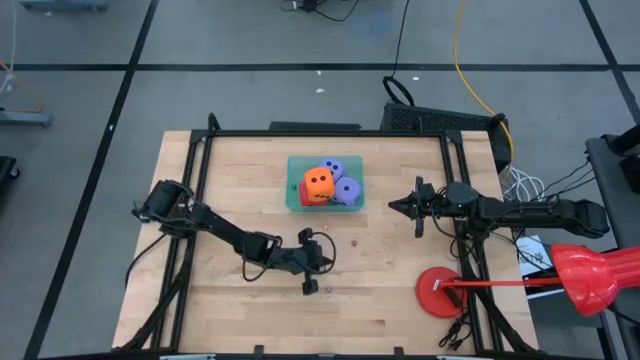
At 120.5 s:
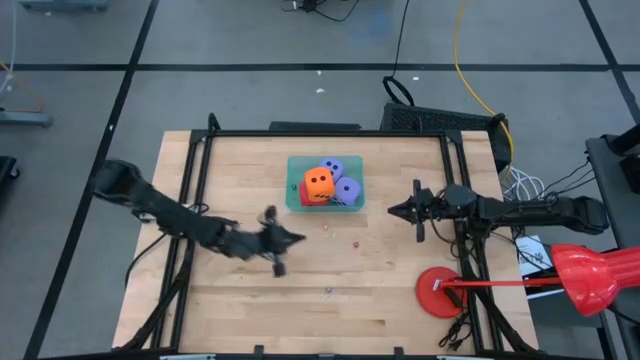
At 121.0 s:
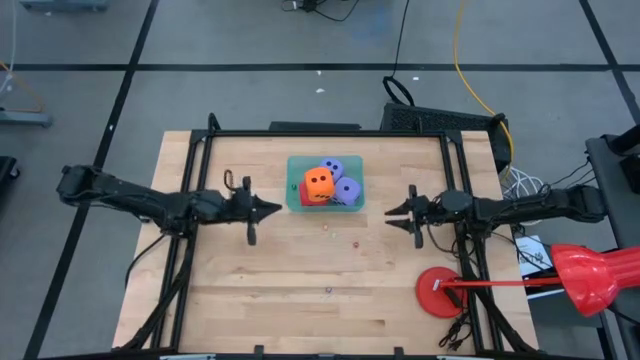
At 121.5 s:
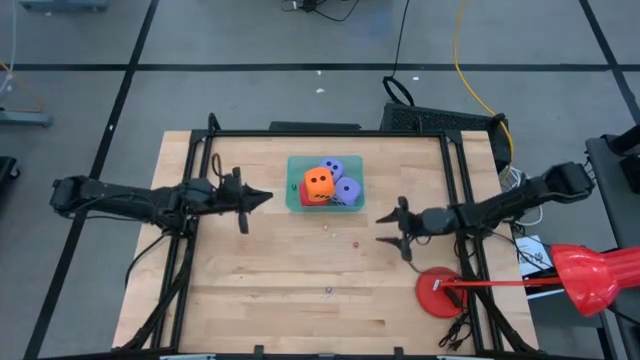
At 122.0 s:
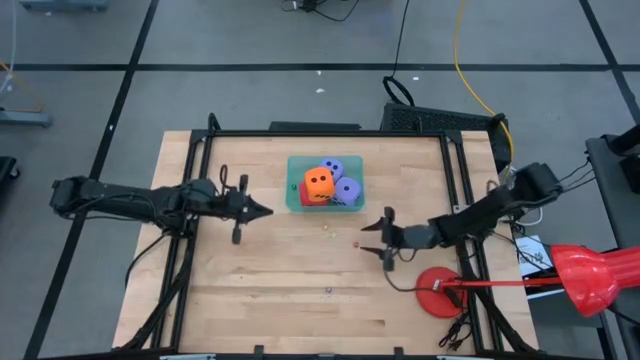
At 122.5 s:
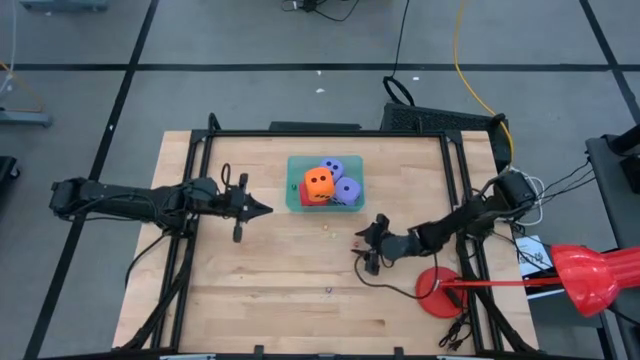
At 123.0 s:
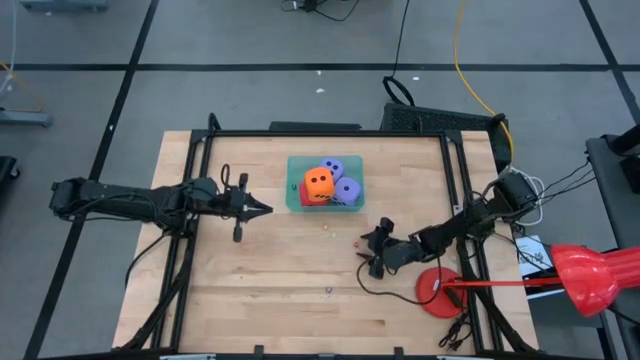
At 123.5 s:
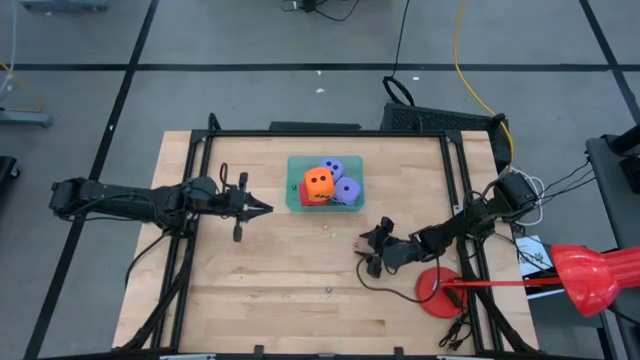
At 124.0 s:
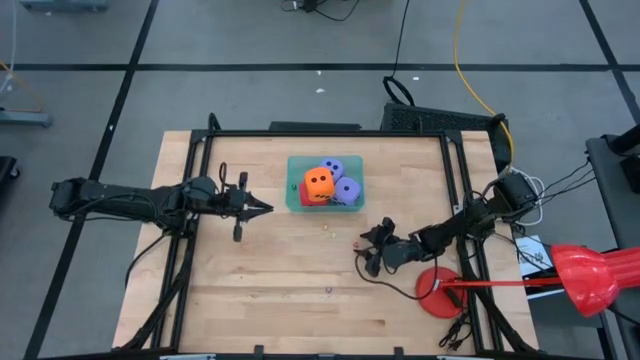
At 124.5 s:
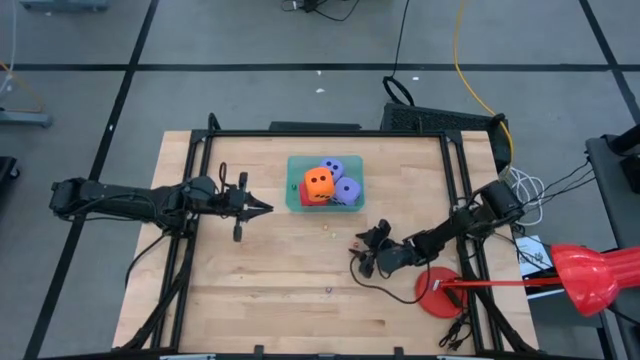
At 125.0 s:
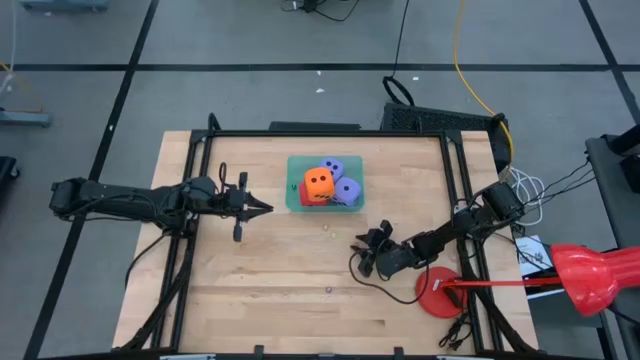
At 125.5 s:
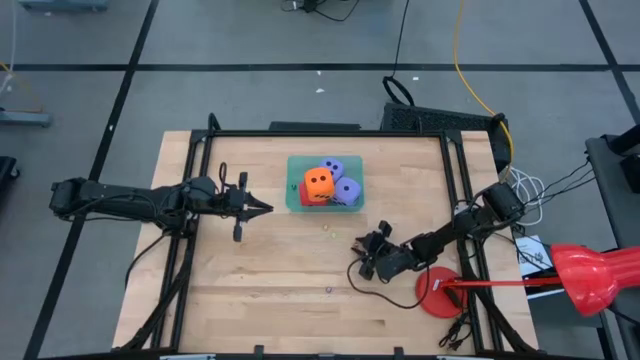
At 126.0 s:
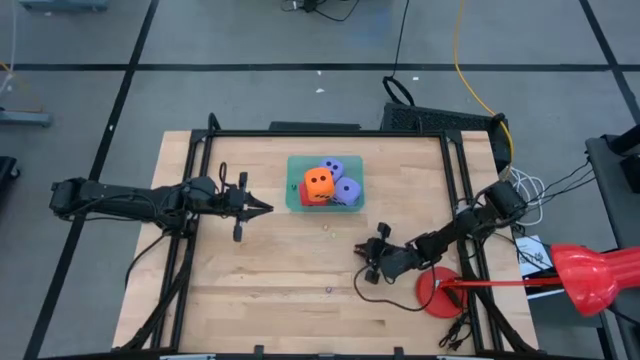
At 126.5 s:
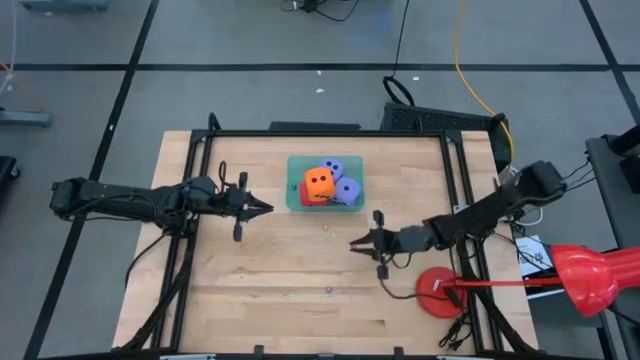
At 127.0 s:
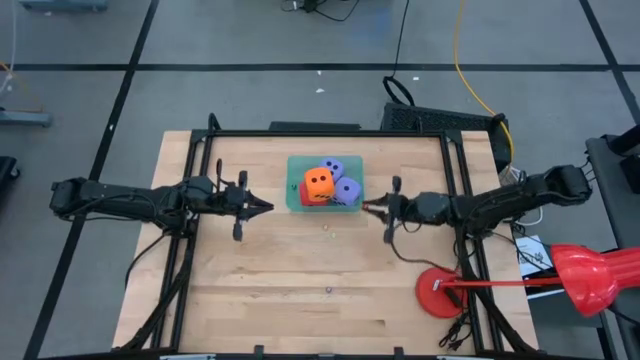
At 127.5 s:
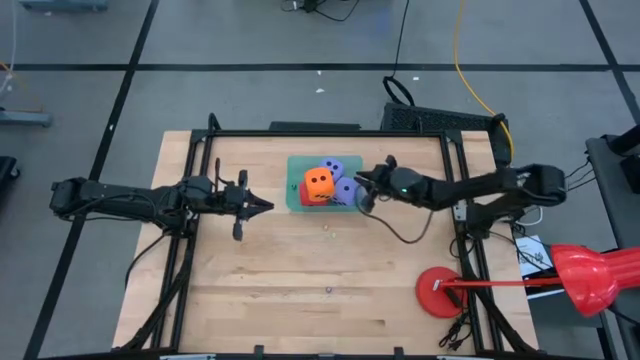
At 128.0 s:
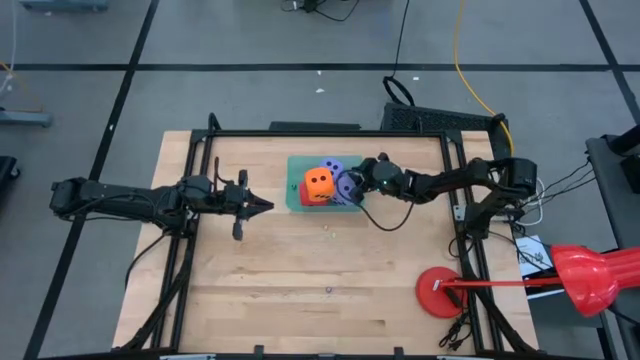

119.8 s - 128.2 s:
Task: Pick & Place Dice
Put the small red dice into the blue bin

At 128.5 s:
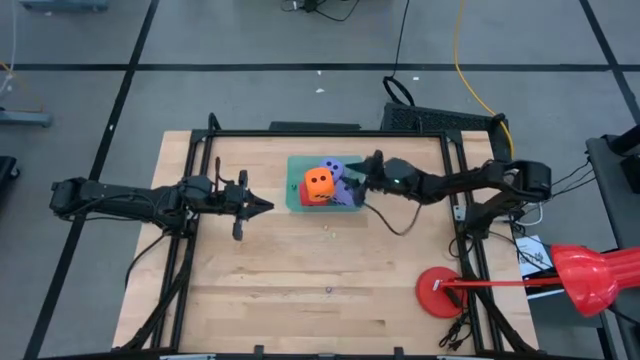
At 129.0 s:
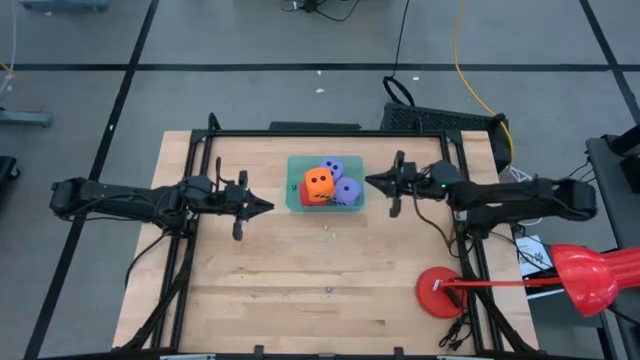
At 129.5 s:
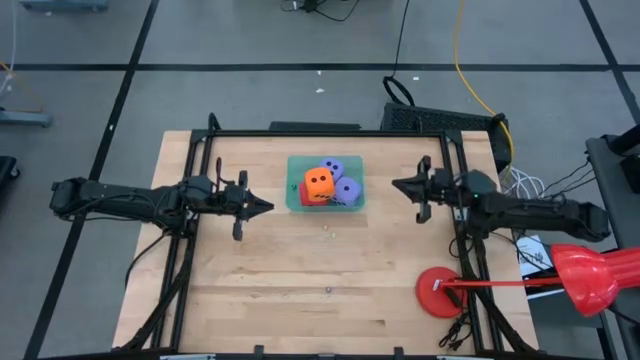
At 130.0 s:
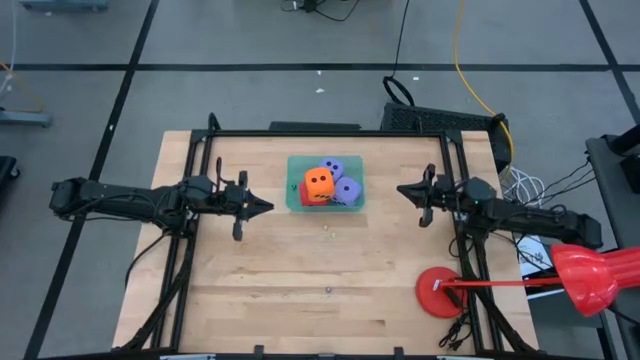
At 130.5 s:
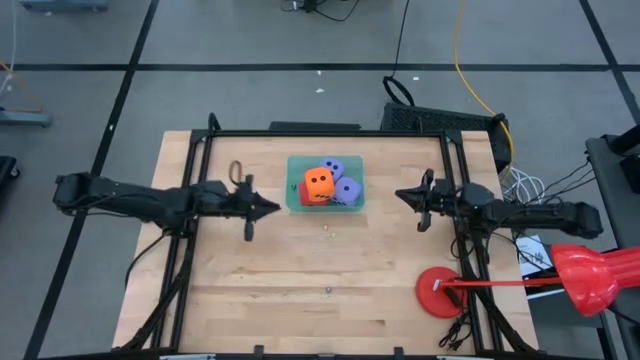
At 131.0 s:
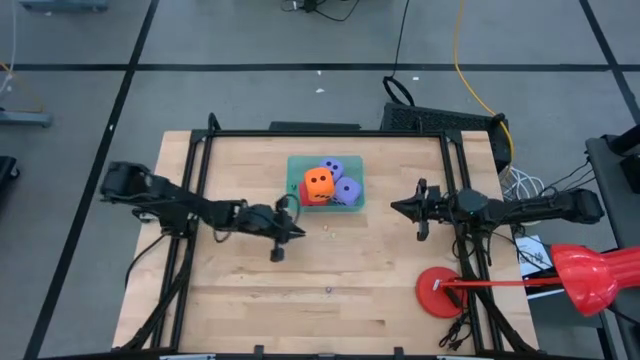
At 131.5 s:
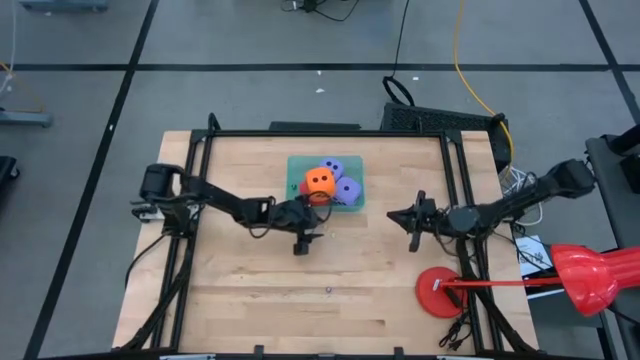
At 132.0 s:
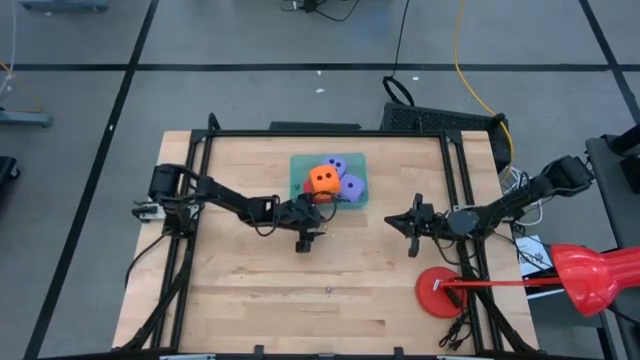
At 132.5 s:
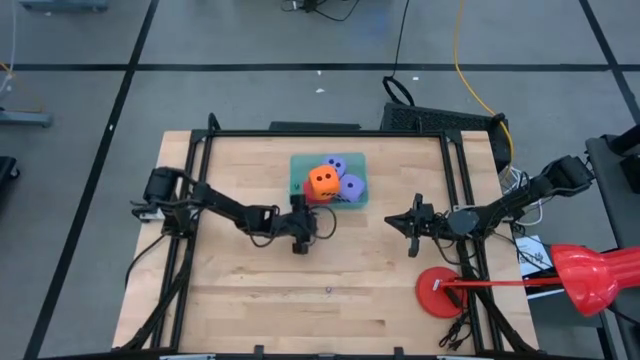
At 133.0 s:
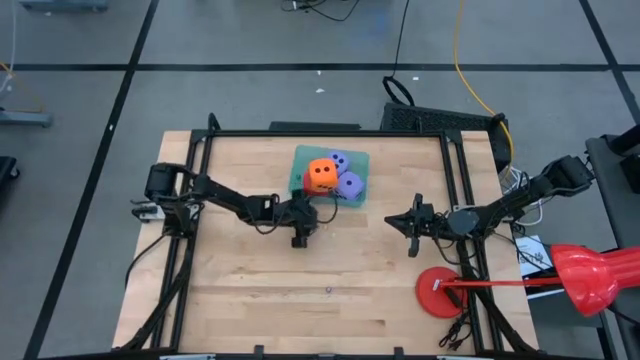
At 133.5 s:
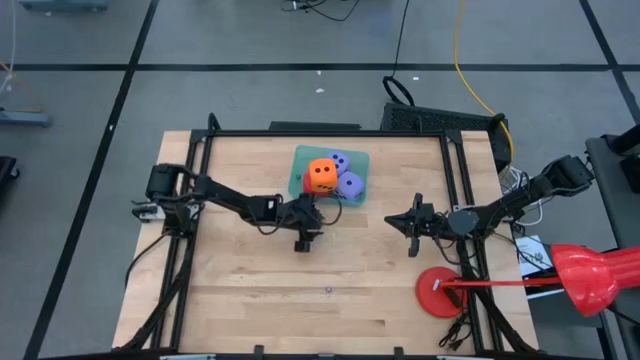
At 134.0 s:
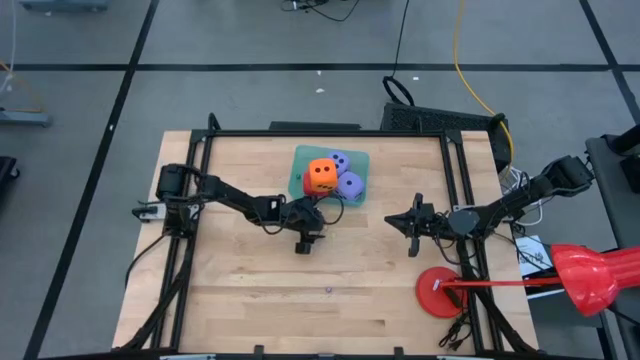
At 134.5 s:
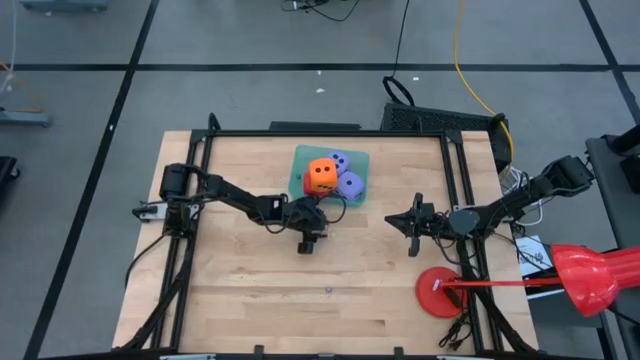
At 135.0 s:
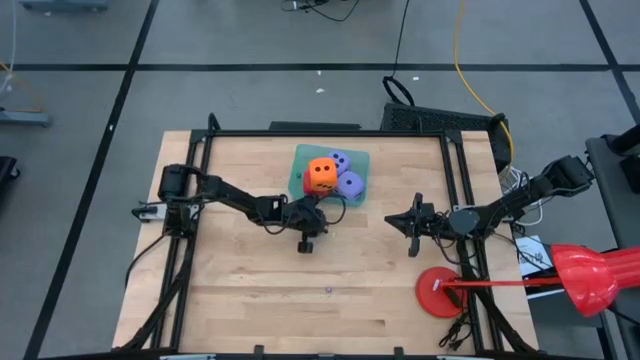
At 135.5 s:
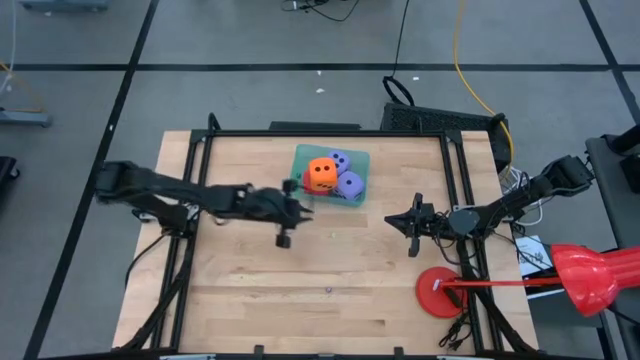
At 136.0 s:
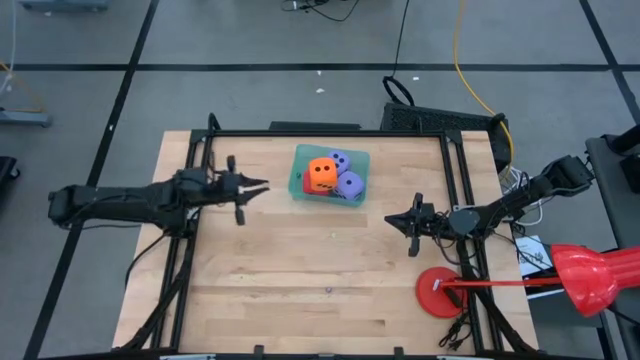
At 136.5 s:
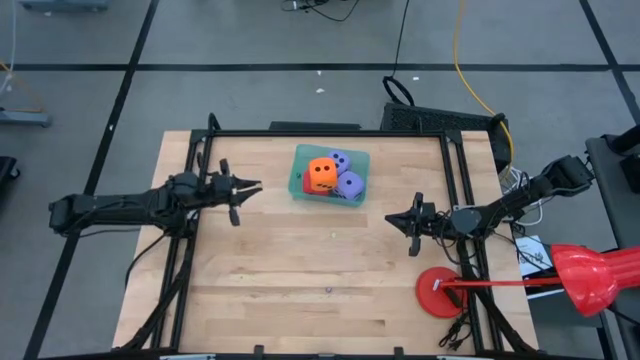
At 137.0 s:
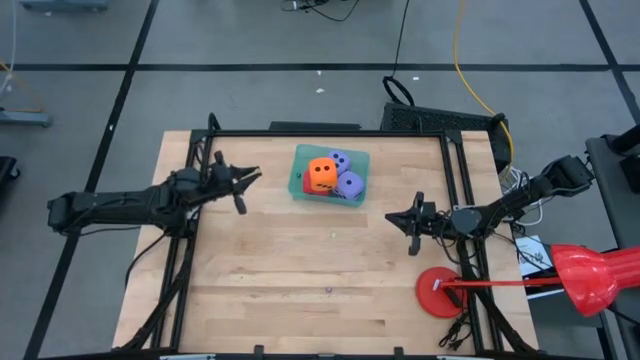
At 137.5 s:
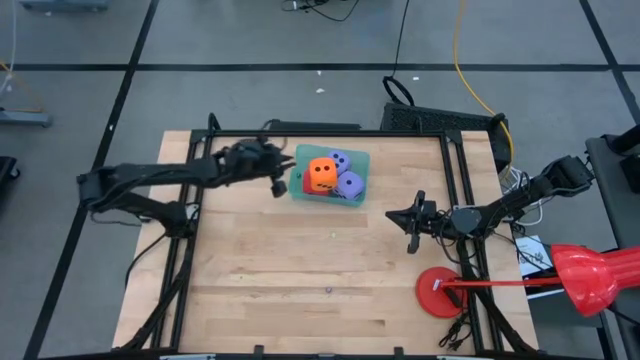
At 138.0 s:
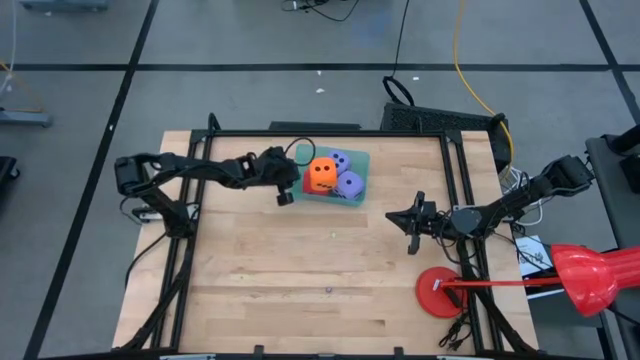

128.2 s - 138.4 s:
Put the small yellow dice into the blue bin

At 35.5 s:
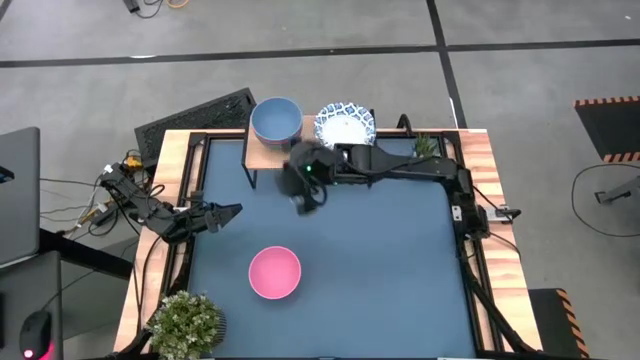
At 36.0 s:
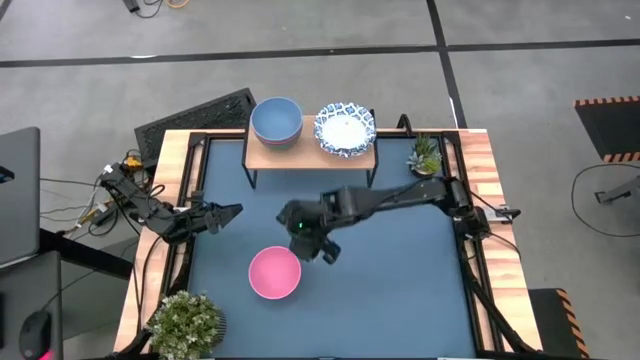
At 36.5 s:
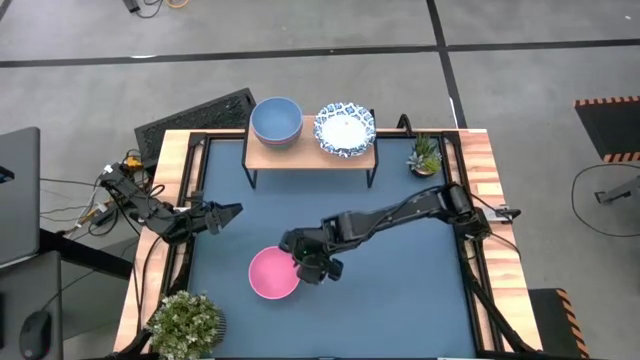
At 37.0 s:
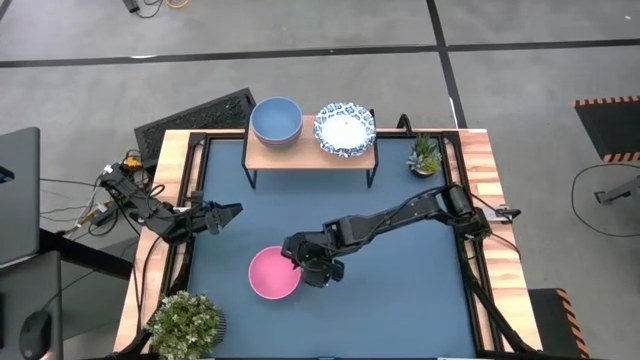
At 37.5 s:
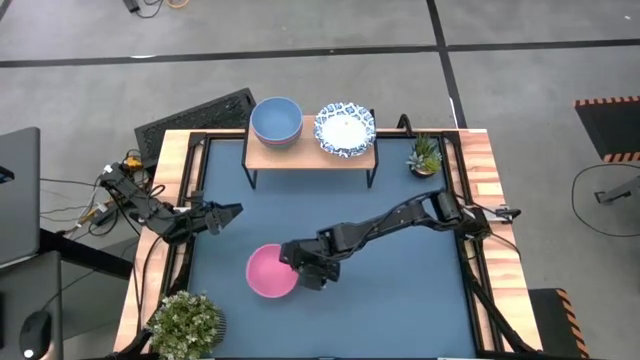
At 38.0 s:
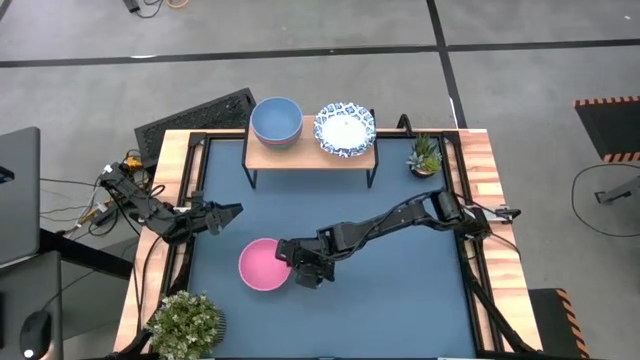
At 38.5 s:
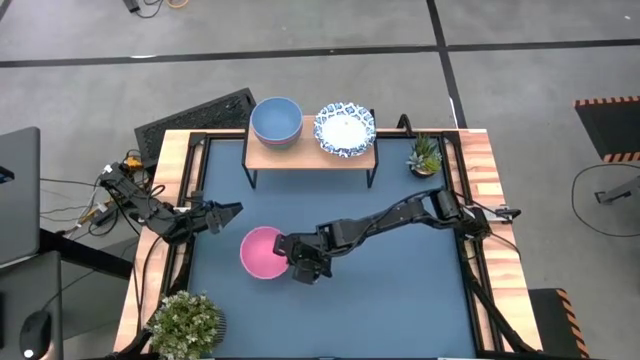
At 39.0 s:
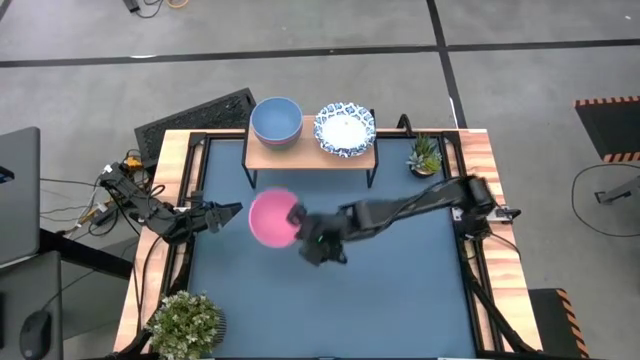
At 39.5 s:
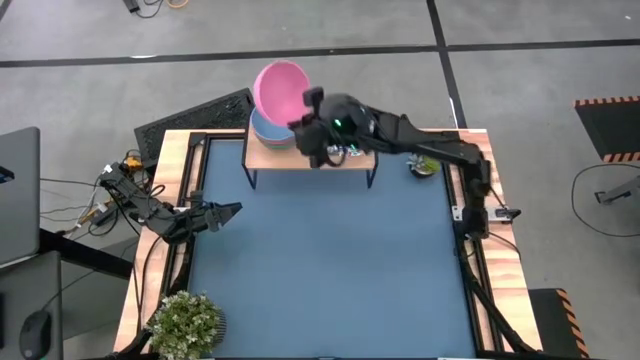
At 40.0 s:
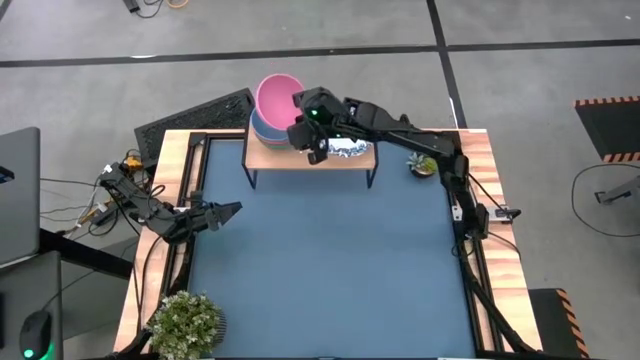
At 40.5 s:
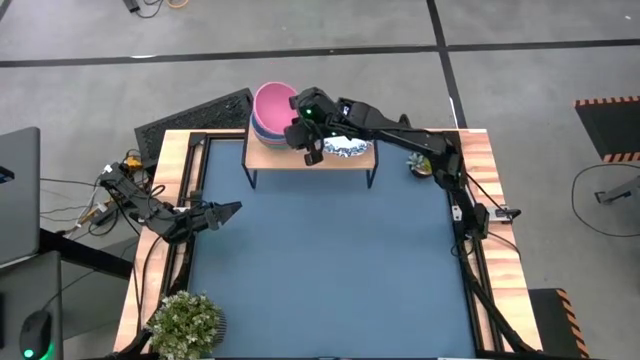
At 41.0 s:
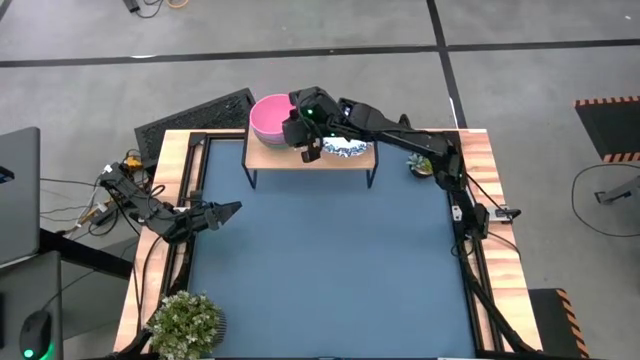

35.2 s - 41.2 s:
Task: Place and stack bowls onto a shelf
Stack the pink bowl on top of the blue bowl on the shelf
